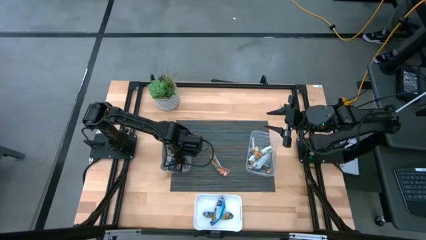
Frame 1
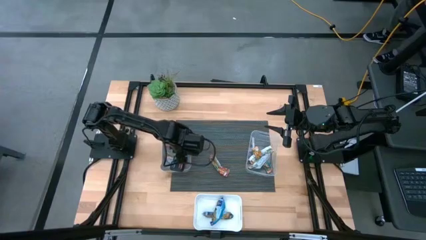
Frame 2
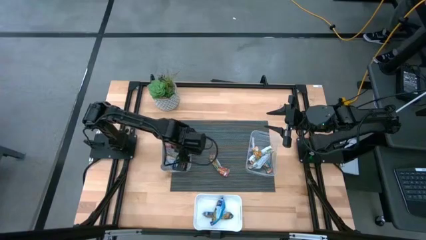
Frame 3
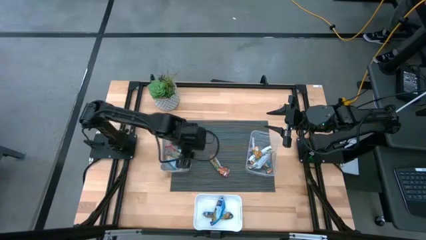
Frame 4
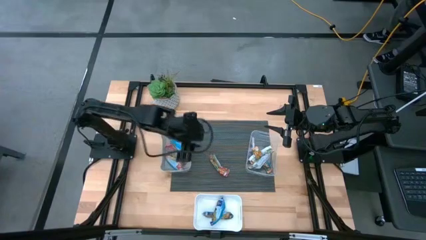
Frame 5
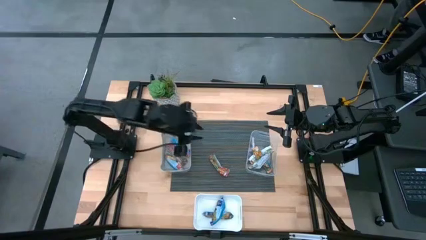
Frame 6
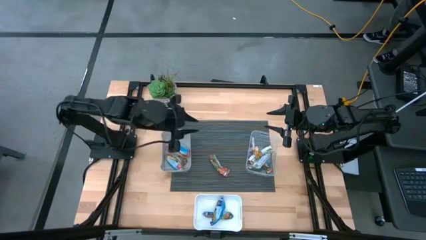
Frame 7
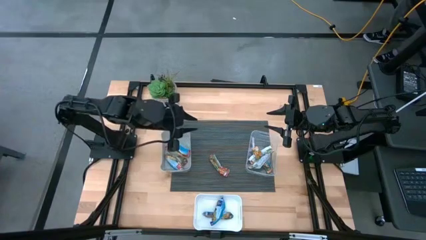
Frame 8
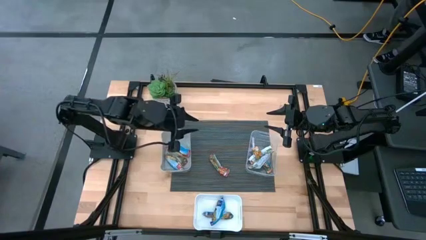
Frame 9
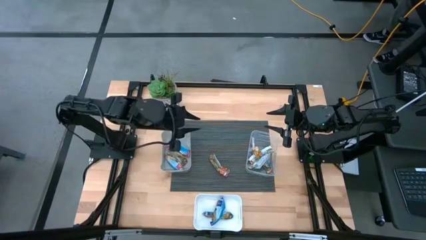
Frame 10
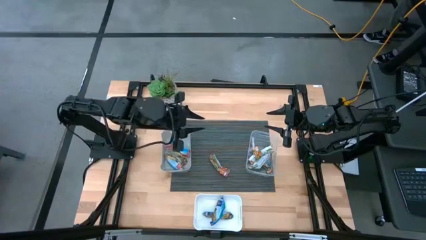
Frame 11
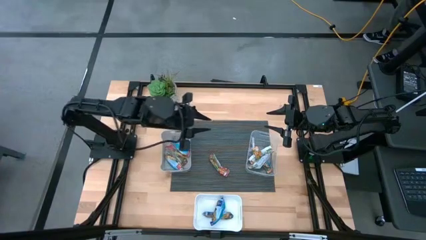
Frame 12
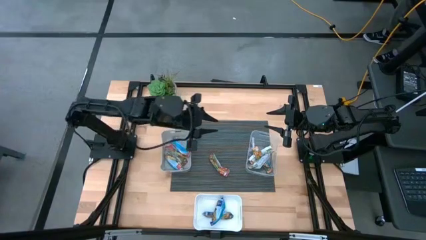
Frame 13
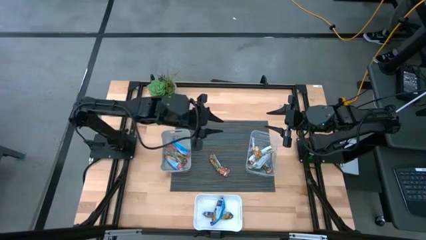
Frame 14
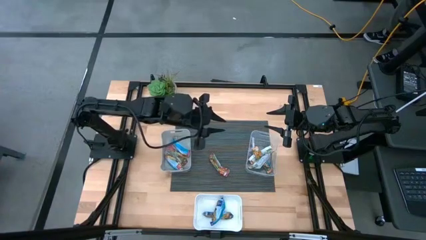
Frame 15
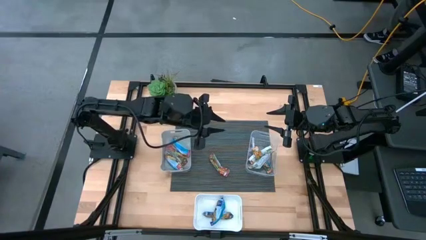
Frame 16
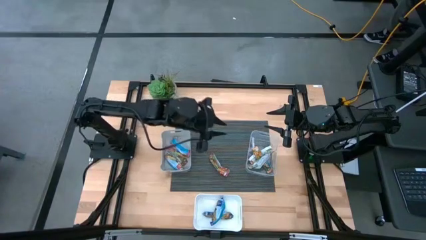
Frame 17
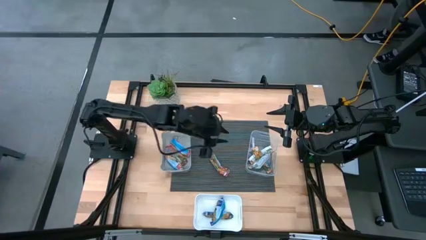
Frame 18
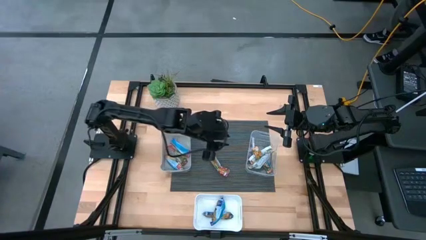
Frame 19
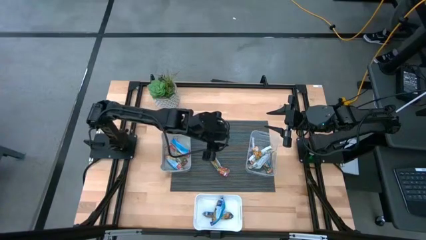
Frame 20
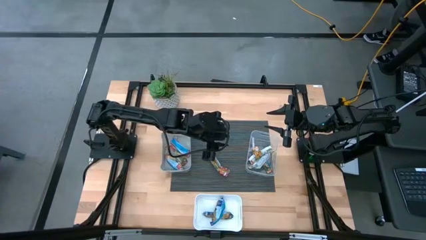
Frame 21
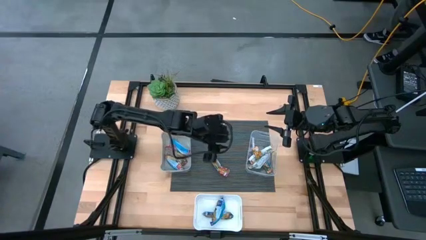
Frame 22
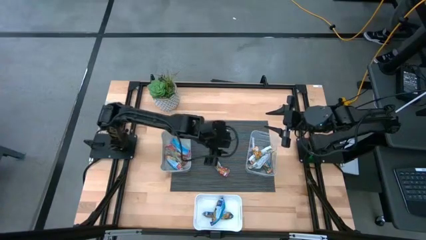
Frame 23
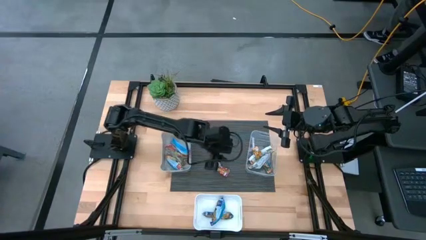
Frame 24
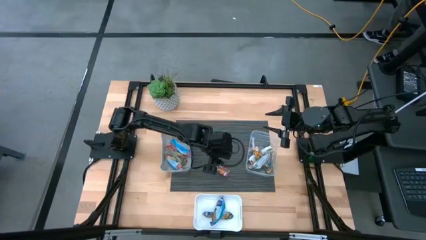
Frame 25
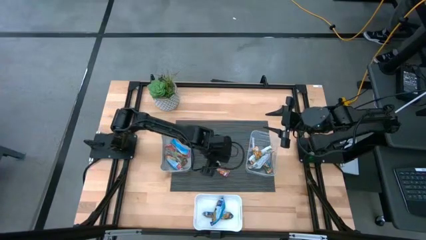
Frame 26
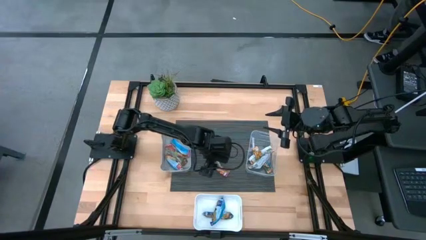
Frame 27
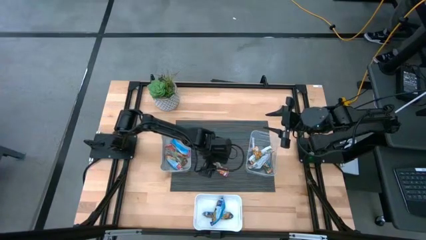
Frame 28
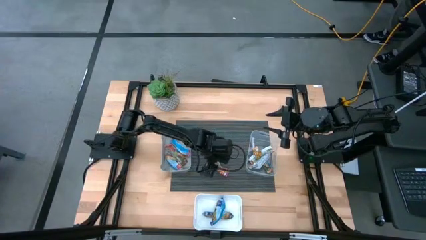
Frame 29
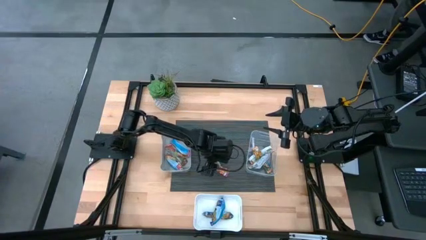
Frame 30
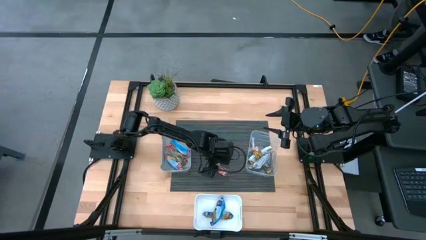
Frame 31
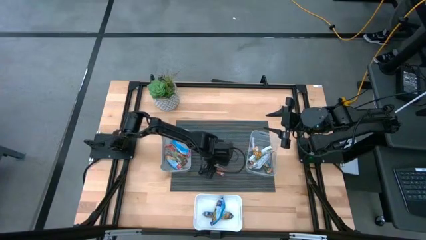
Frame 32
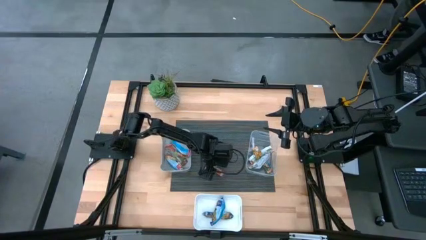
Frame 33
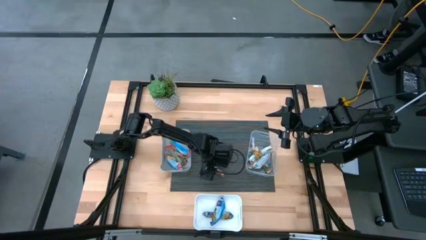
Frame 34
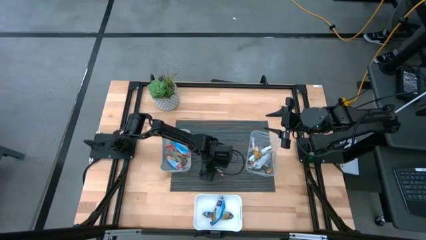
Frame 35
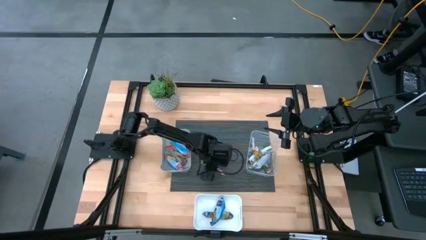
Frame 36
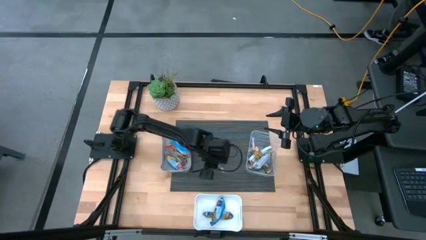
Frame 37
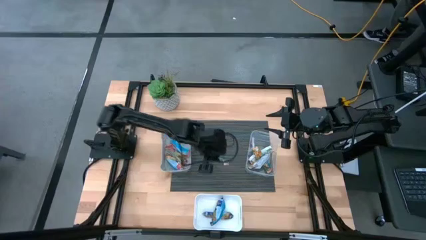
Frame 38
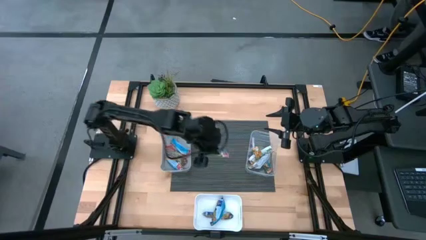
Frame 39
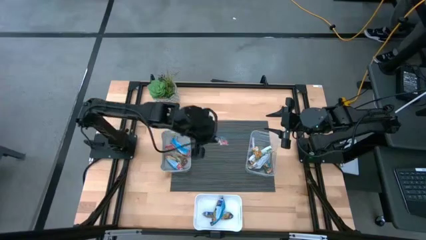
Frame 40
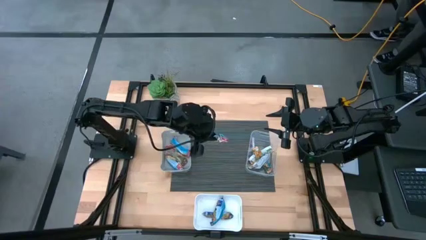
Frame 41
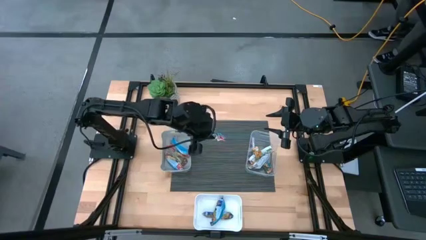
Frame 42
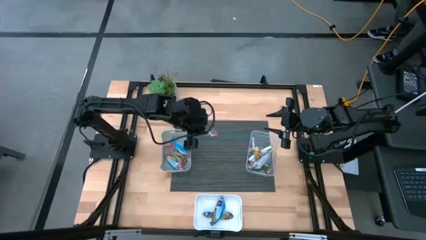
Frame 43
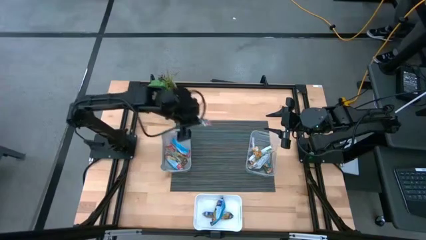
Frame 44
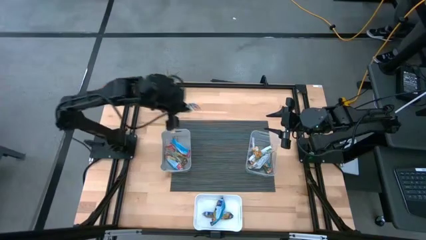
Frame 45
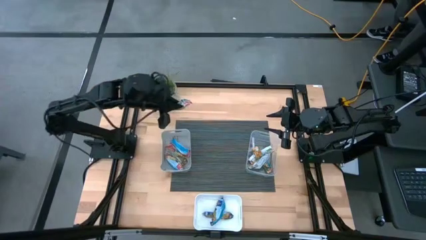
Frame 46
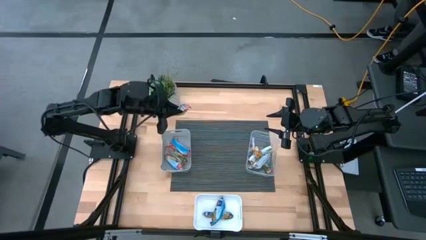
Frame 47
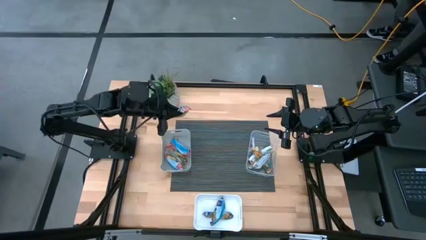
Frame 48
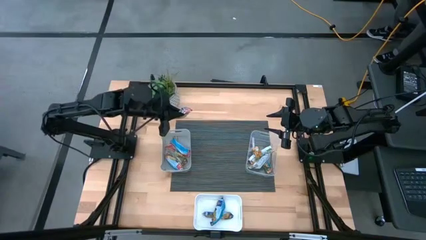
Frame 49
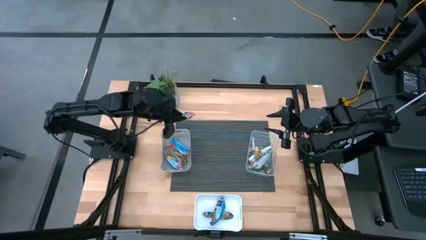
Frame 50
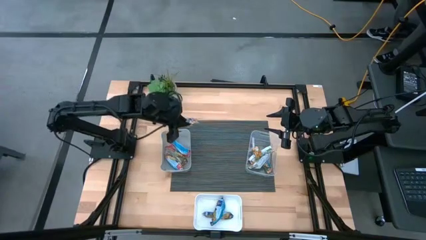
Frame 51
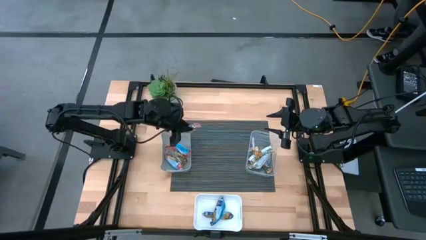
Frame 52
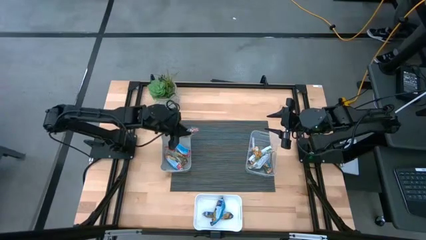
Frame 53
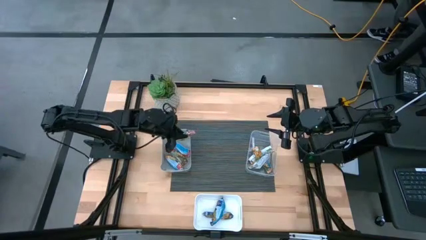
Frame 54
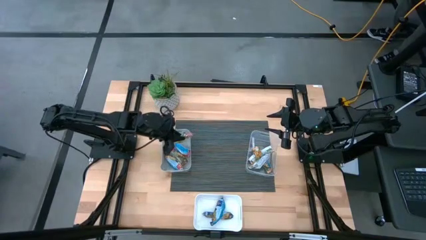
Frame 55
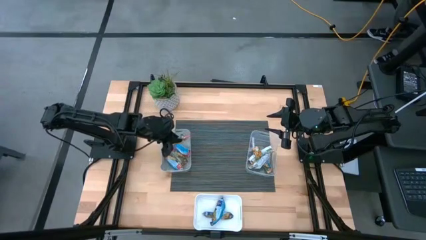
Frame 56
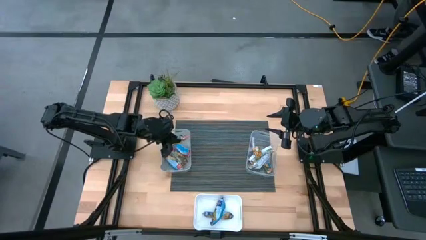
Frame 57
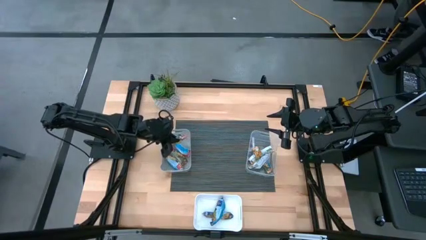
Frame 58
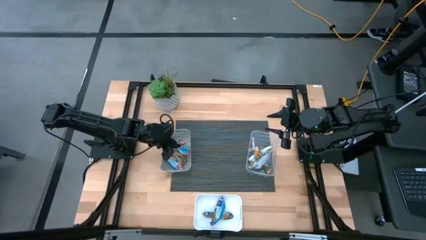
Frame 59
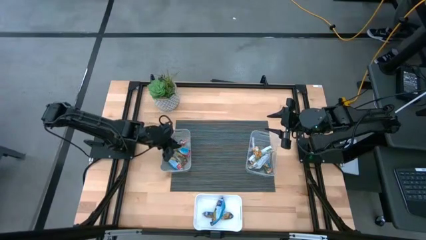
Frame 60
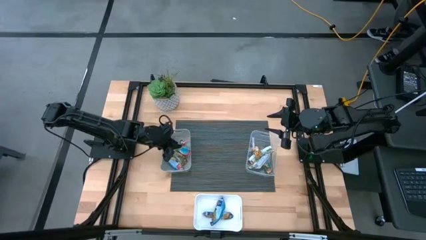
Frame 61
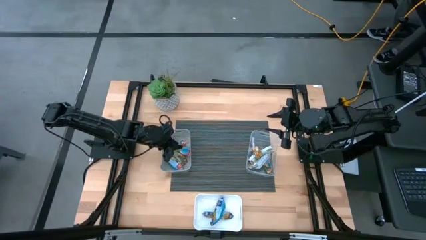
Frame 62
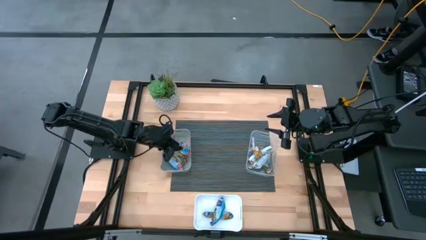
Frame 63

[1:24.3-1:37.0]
Task: Pick and place Granola Bars by type
Put the red granola bar into the gray bin
